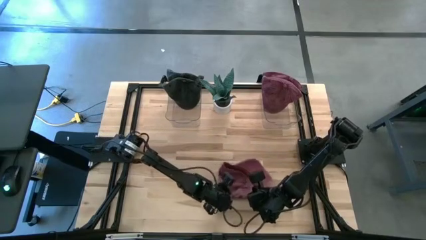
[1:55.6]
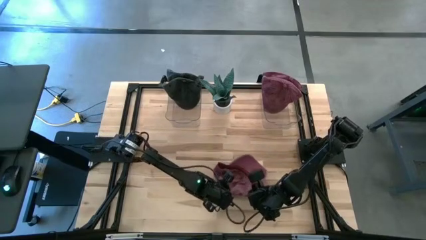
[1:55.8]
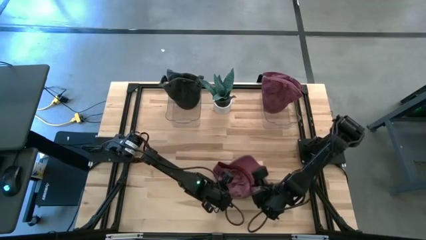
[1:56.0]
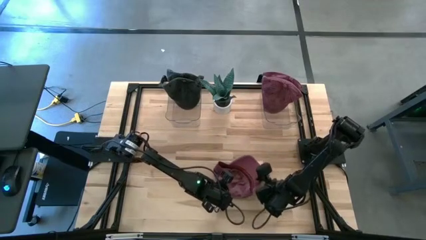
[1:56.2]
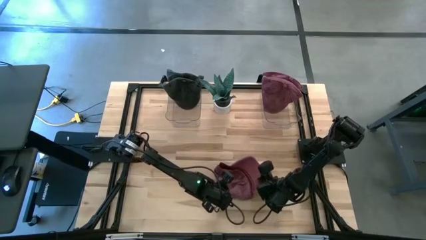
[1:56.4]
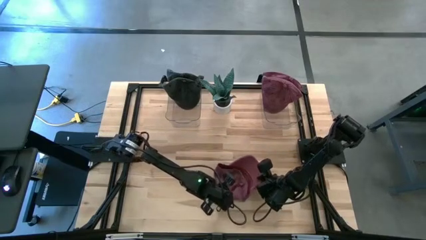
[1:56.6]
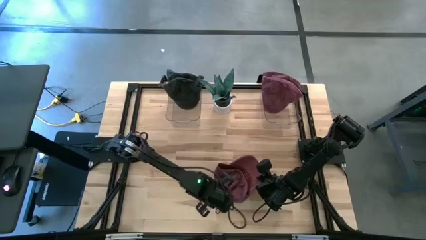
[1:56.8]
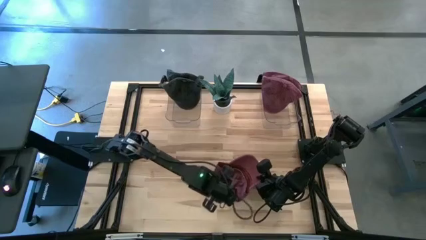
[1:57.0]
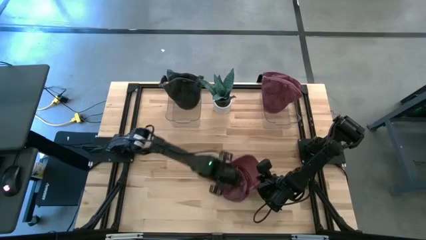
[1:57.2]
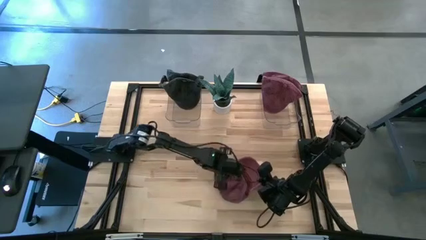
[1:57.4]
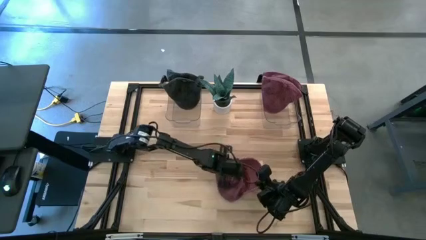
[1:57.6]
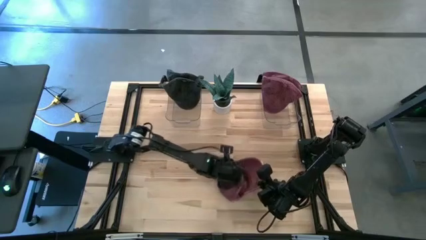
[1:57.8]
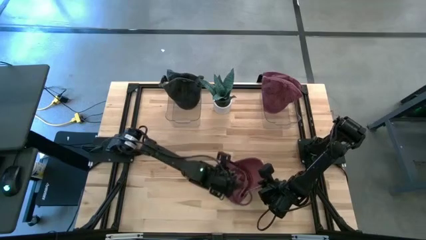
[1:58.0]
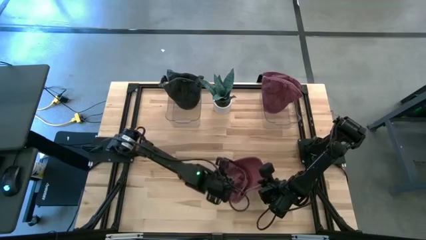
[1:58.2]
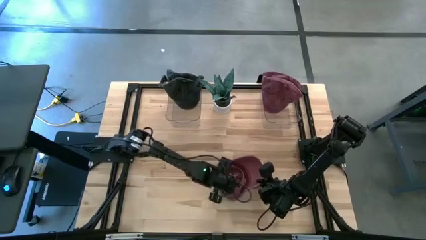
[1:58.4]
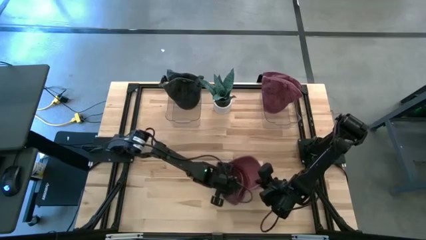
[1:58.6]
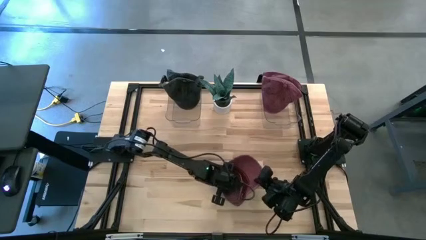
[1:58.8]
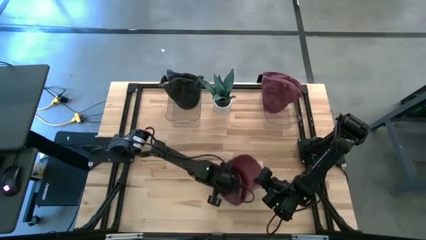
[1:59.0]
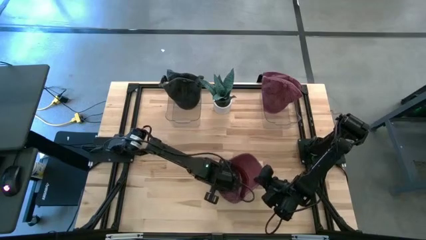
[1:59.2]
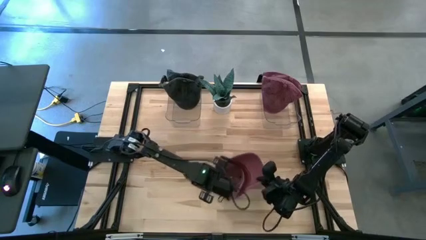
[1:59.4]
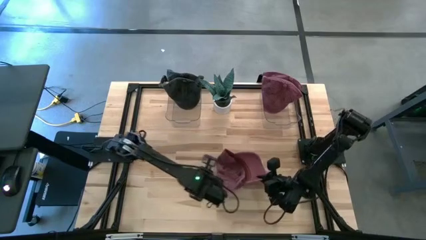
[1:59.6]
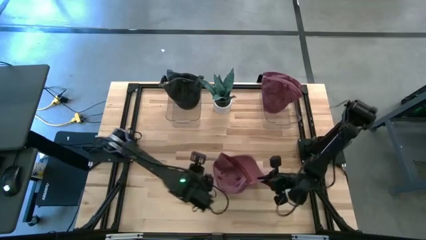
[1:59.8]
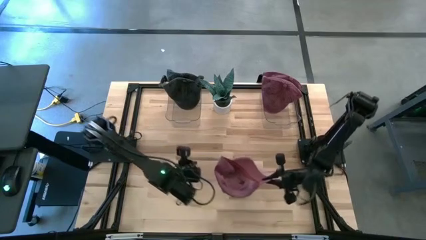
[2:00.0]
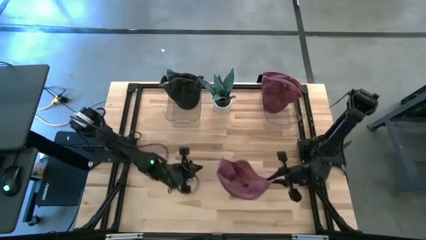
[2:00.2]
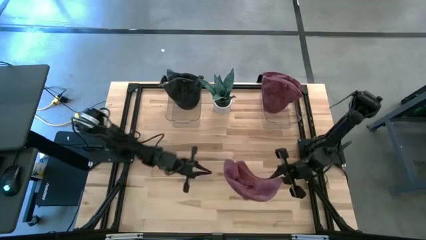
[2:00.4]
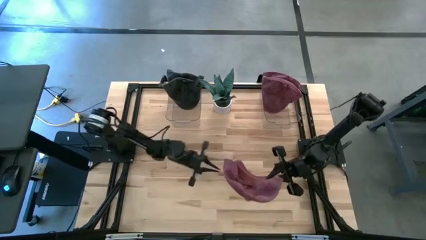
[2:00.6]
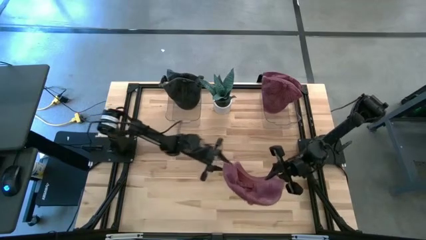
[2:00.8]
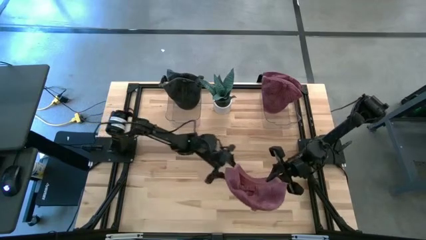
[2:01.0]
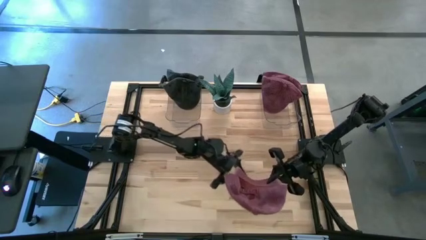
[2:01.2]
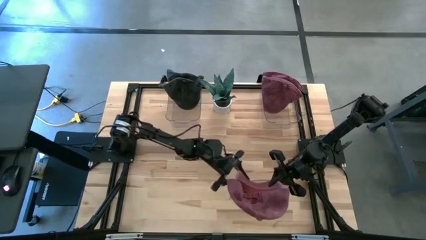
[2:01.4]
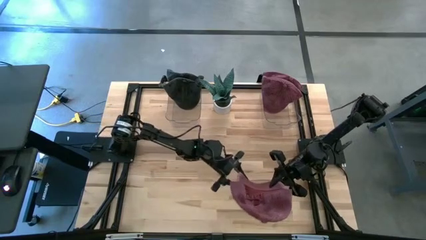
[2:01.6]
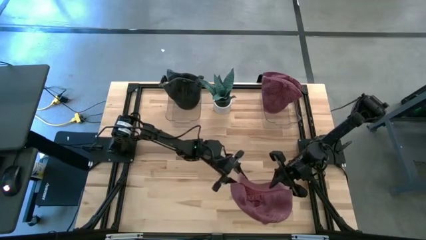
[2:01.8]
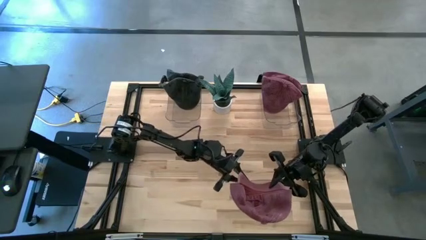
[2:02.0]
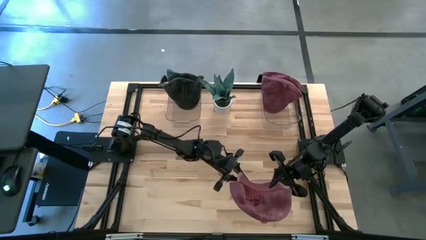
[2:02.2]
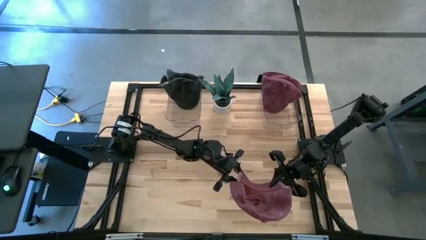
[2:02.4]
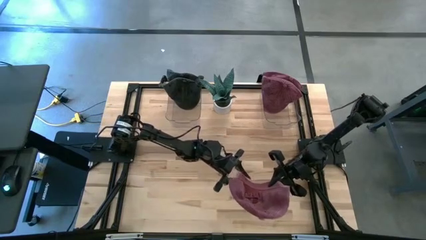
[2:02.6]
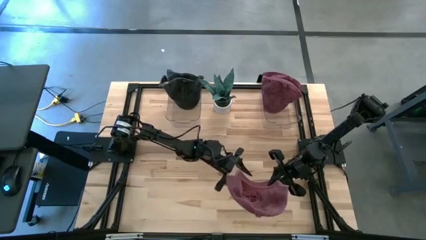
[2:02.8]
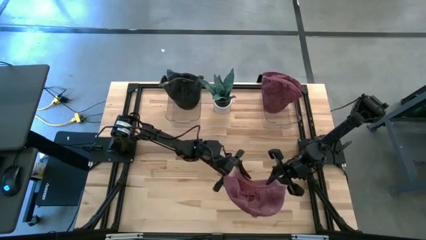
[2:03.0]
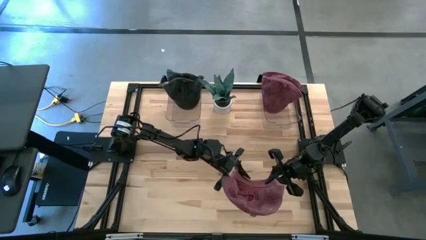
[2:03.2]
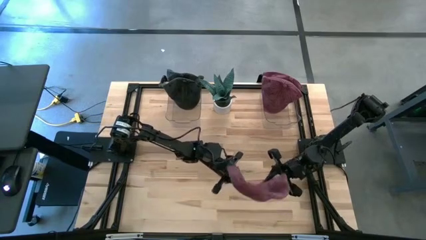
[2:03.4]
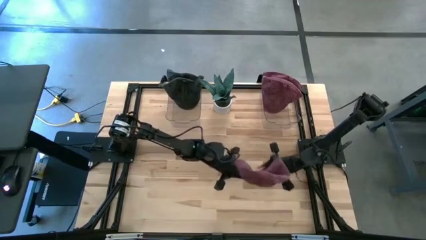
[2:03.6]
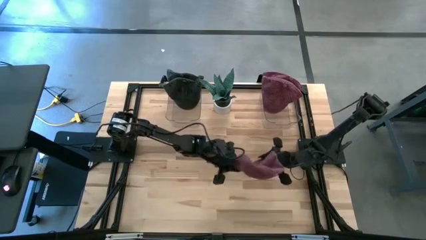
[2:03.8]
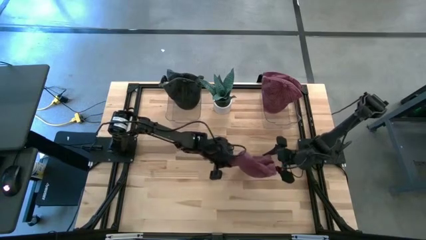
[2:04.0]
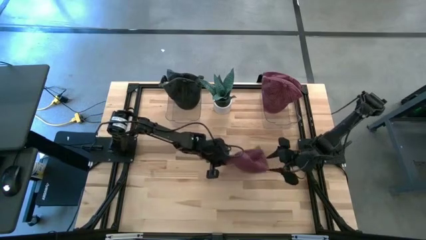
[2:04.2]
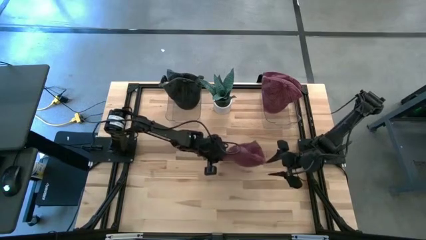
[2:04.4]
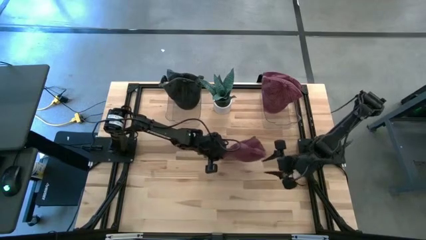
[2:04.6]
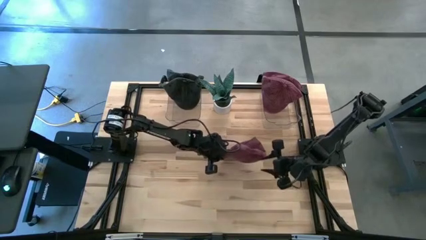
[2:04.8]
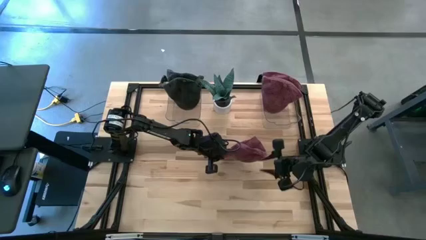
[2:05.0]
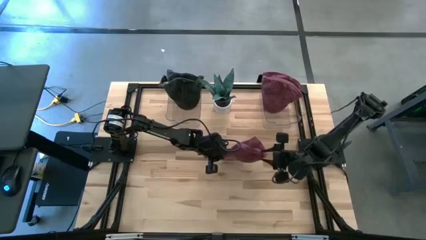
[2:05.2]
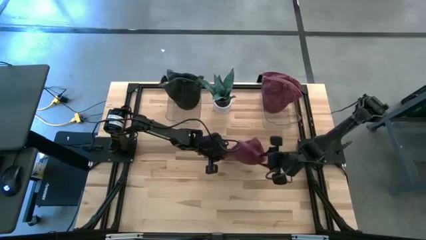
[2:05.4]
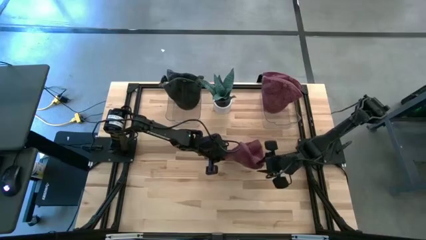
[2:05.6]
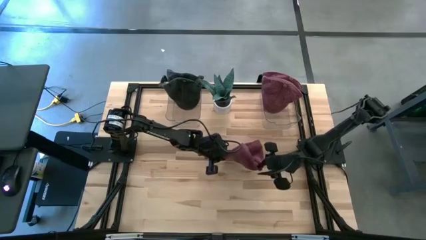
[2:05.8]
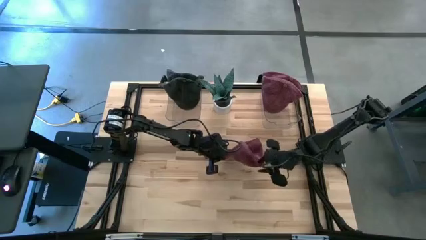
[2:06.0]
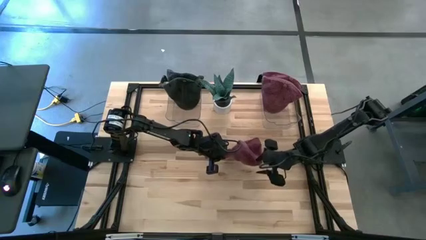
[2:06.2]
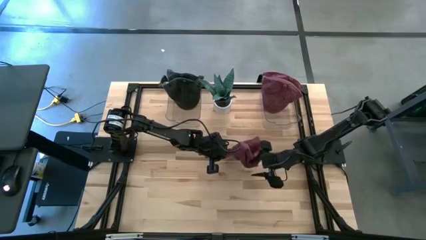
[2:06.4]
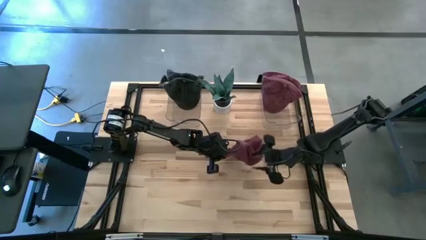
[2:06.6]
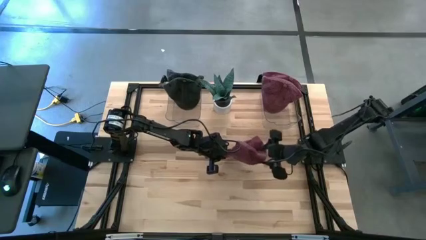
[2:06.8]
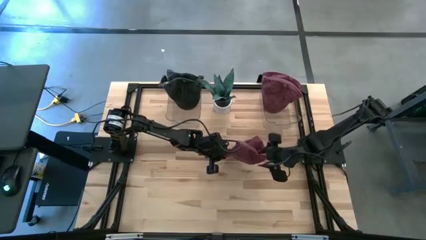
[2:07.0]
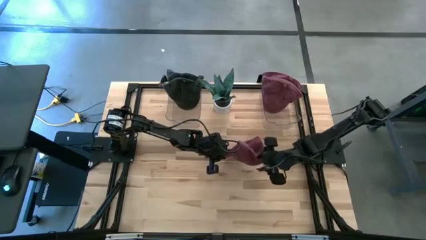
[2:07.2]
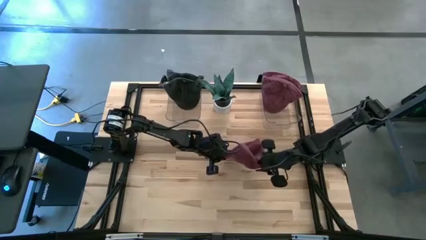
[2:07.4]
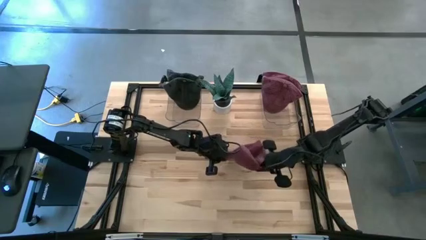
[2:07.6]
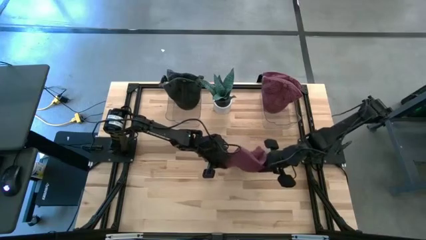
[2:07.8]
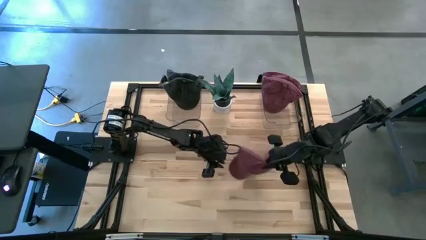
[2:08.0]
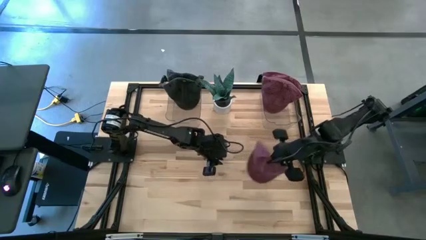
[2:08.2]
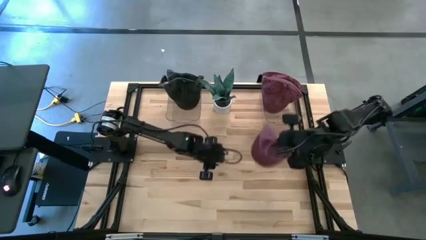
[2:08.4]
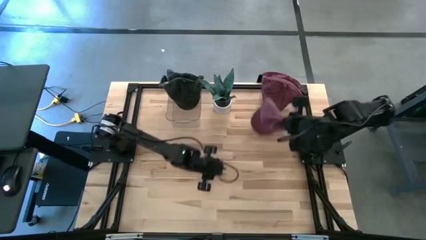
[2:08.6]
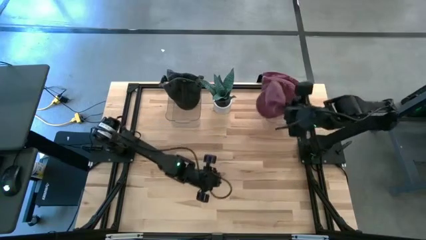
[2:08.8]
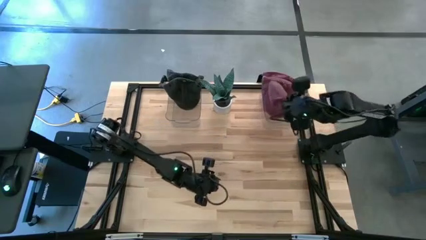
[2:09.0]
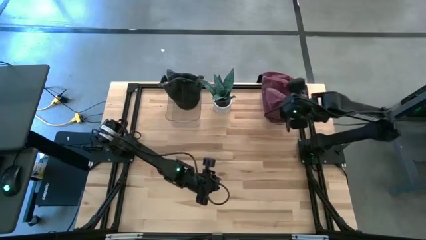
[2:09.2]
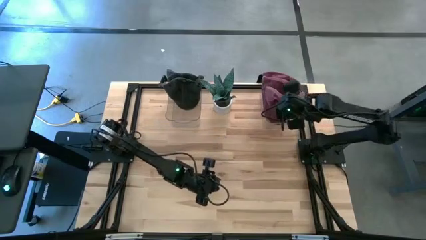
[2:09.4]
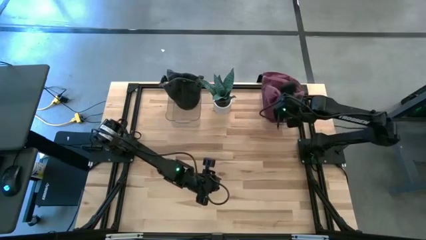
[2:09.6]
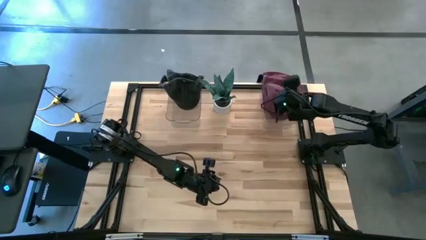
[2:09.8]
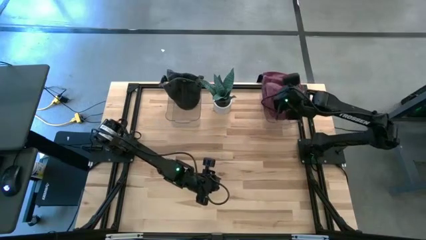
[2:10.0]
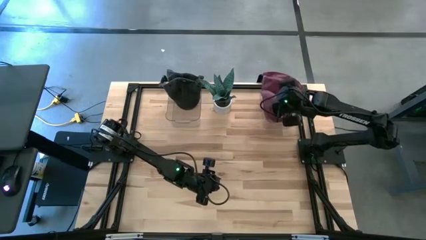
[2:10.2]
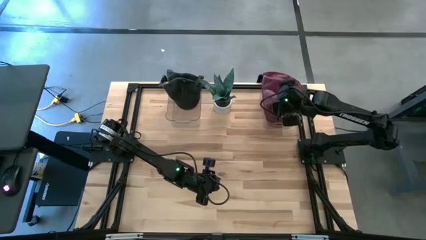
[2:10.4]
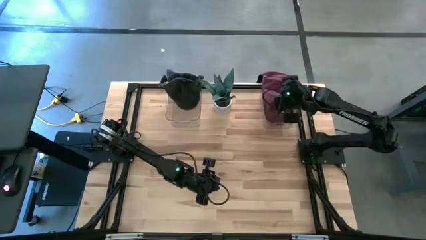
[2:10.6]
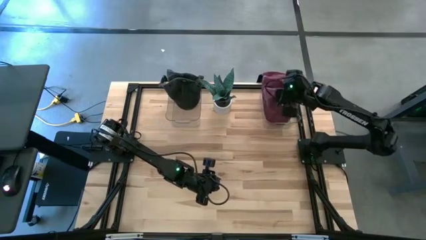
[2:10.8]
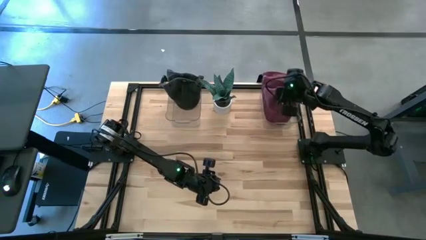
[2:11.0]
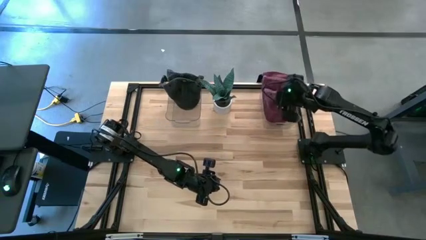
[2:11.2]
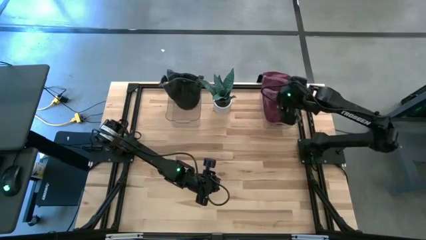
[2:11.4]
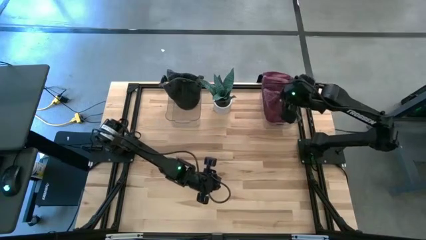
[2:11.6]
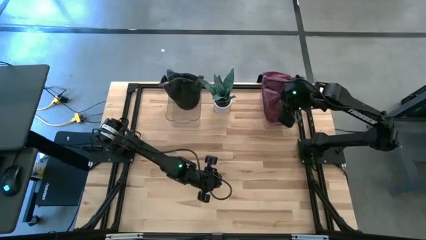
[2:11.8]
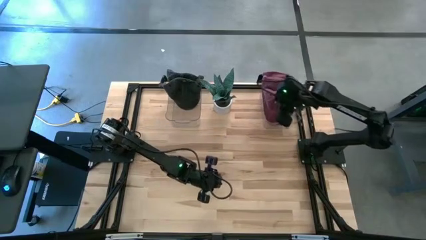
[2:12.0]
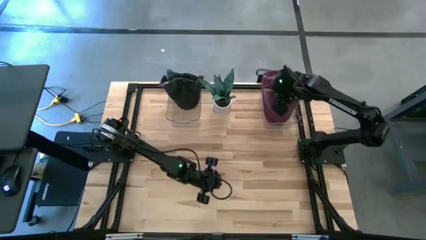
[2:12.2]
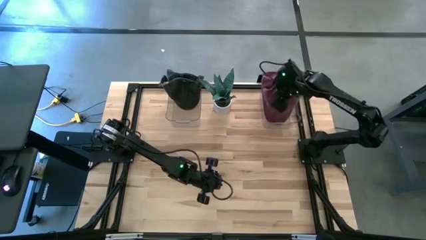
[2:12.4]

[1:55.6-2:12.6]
Task: Pick & Place hat
Put the red cap into the right transparent bin
